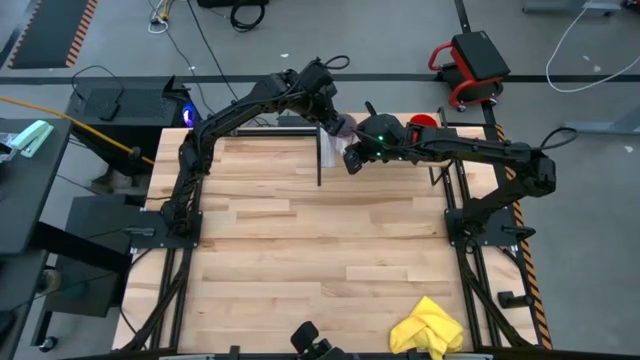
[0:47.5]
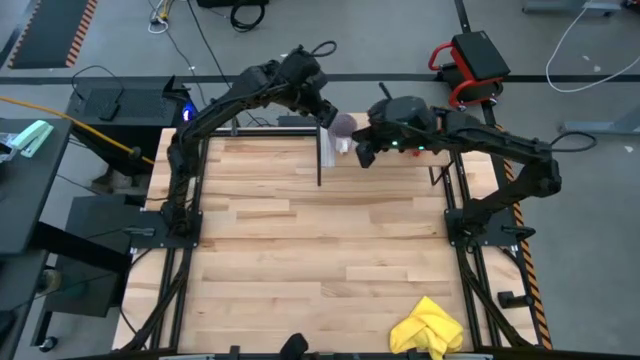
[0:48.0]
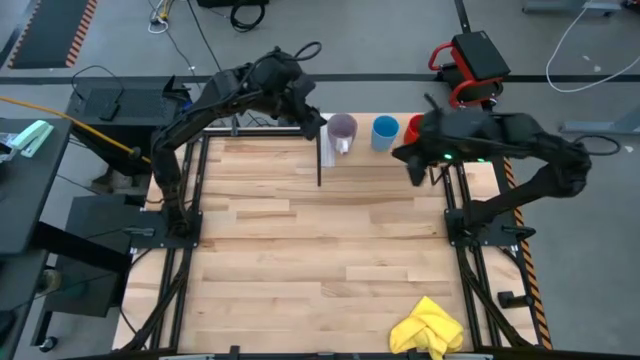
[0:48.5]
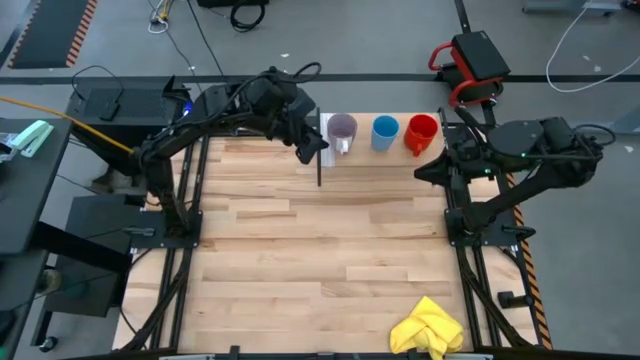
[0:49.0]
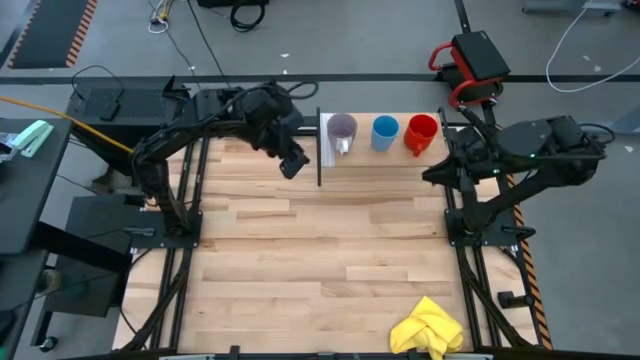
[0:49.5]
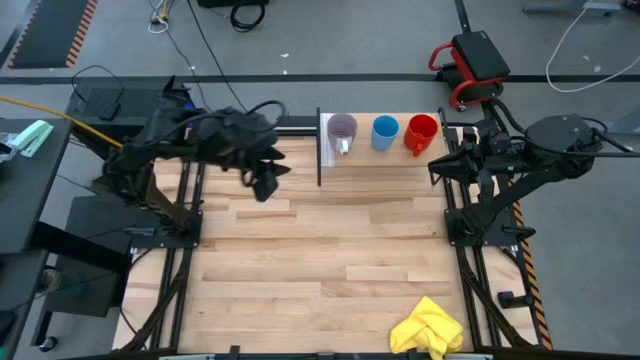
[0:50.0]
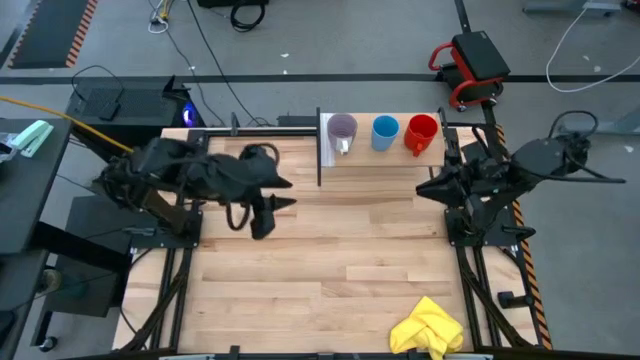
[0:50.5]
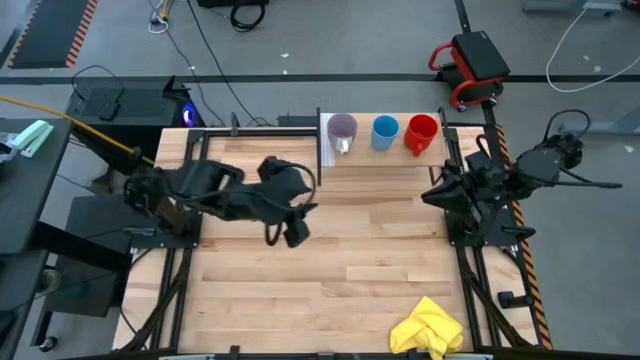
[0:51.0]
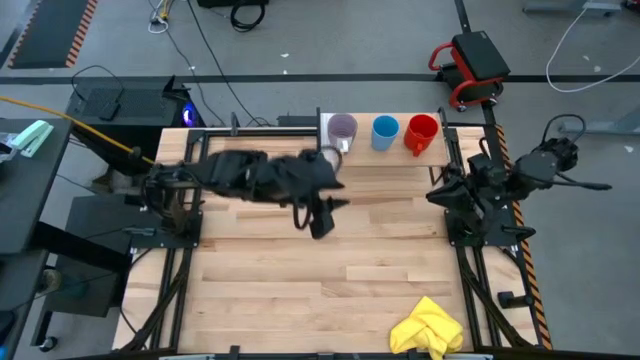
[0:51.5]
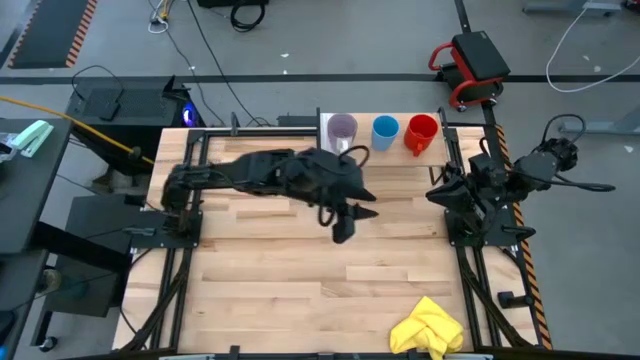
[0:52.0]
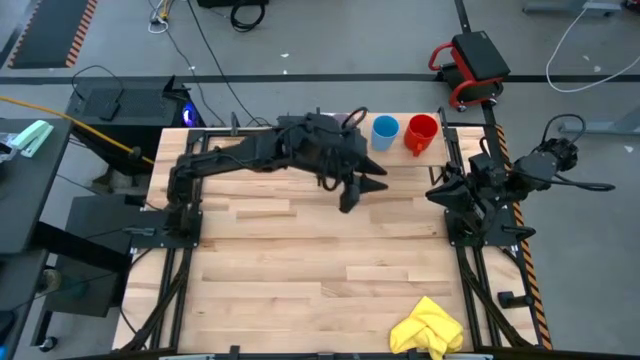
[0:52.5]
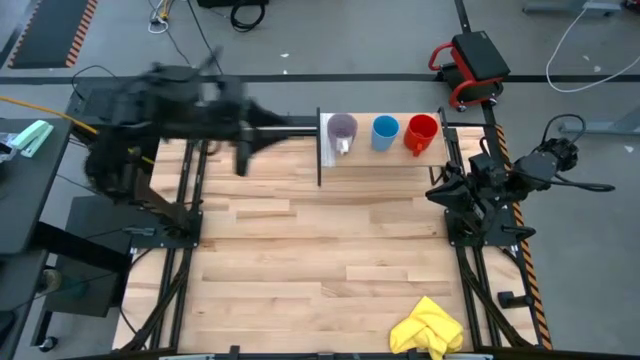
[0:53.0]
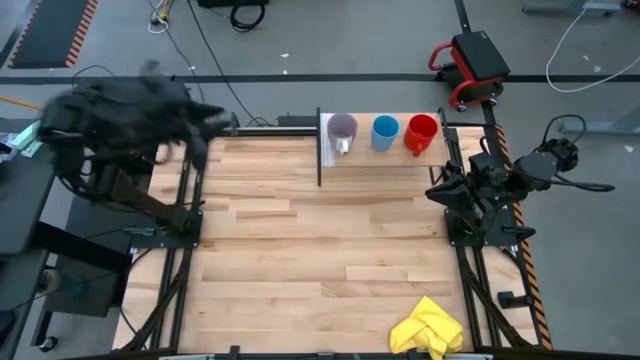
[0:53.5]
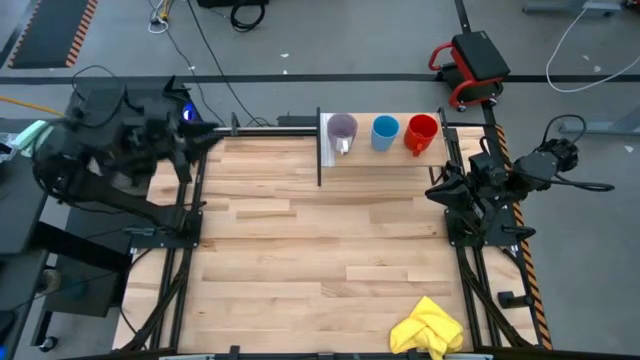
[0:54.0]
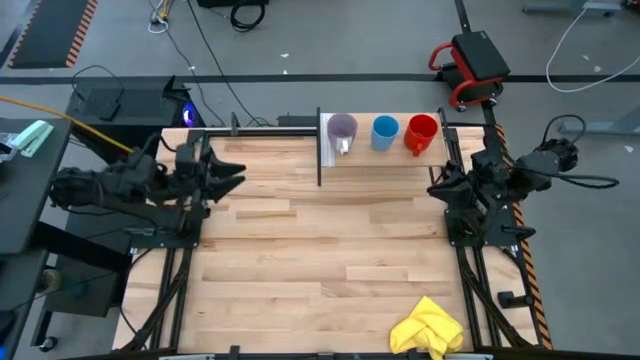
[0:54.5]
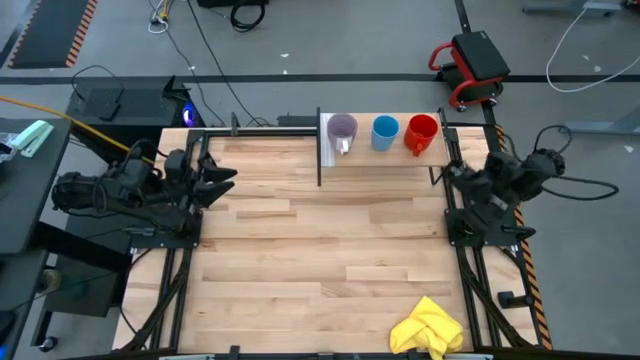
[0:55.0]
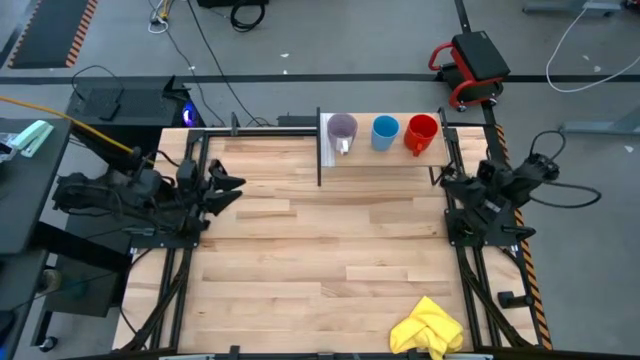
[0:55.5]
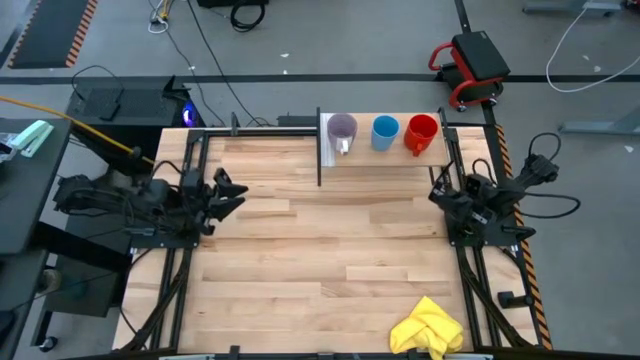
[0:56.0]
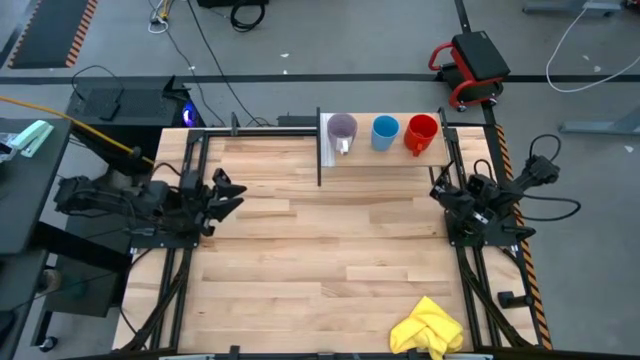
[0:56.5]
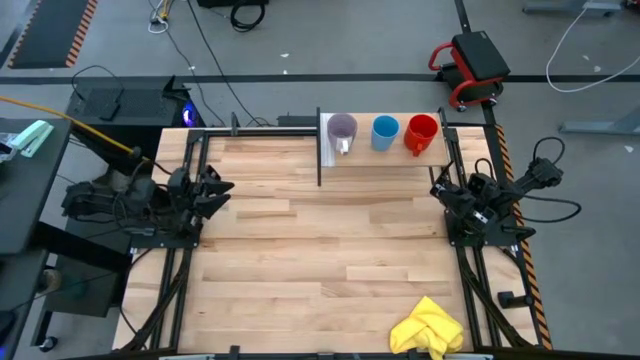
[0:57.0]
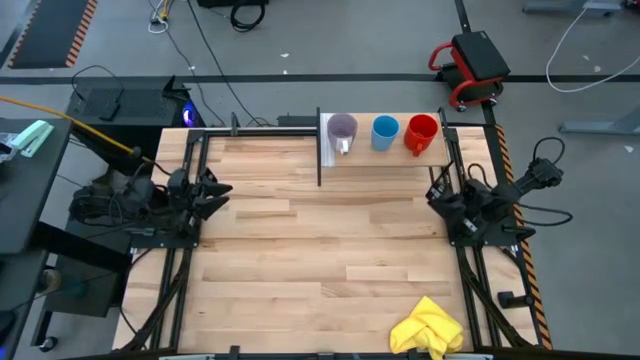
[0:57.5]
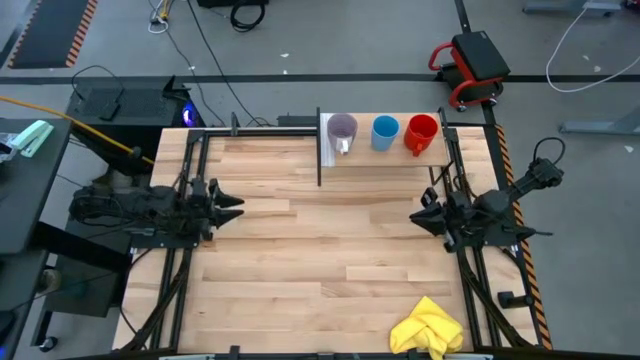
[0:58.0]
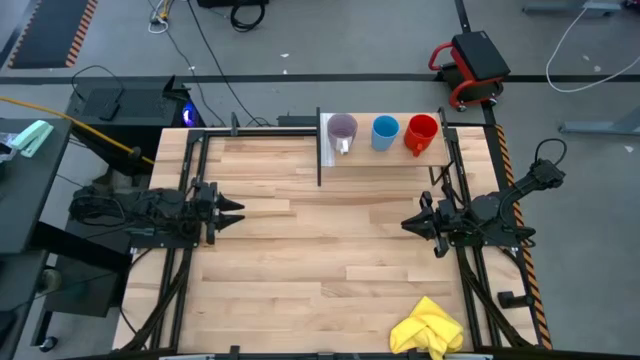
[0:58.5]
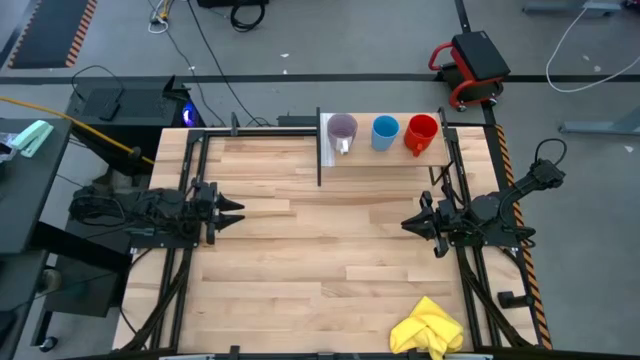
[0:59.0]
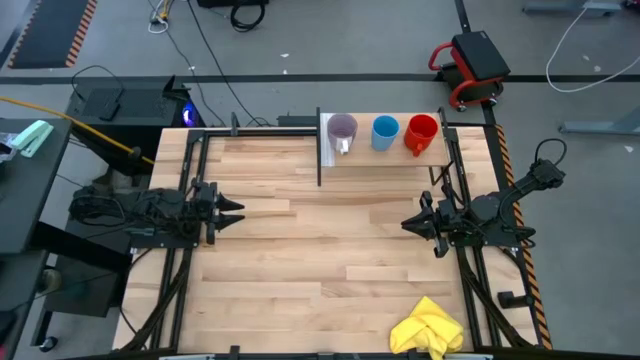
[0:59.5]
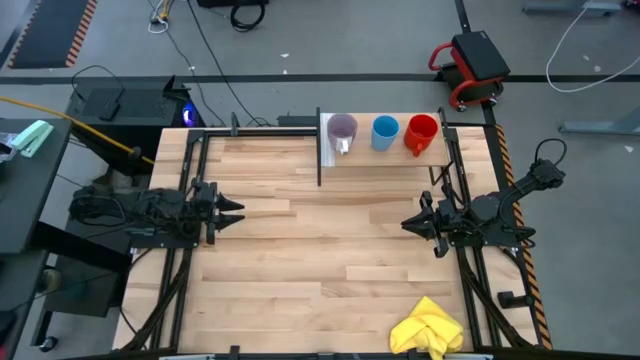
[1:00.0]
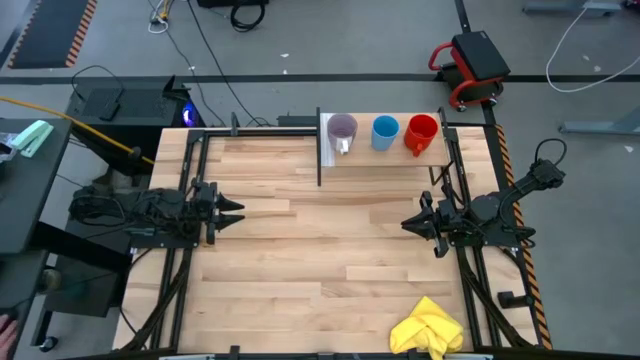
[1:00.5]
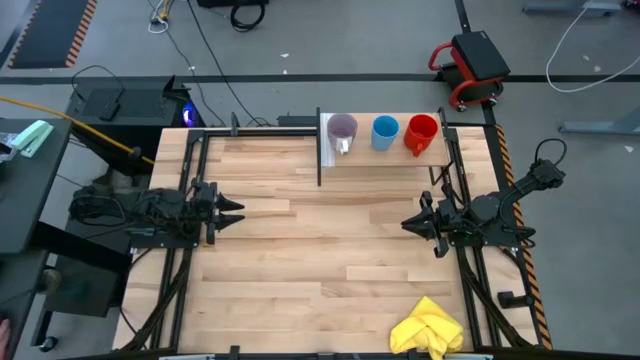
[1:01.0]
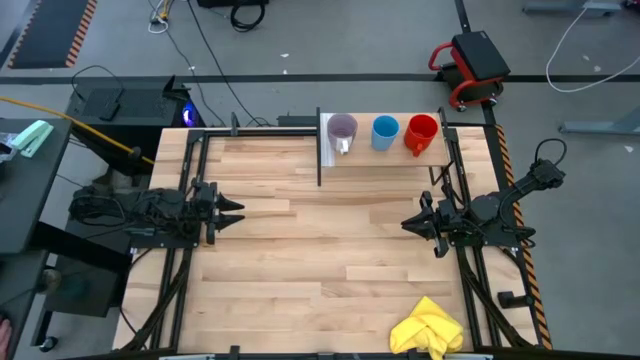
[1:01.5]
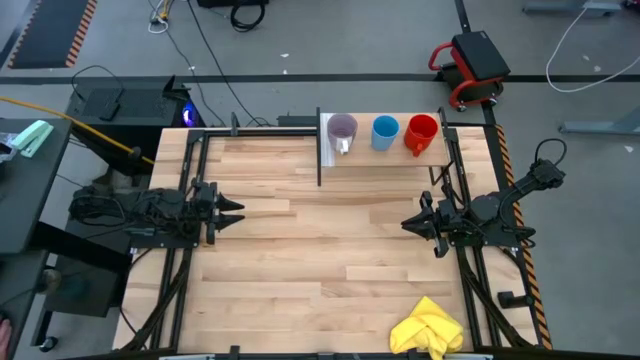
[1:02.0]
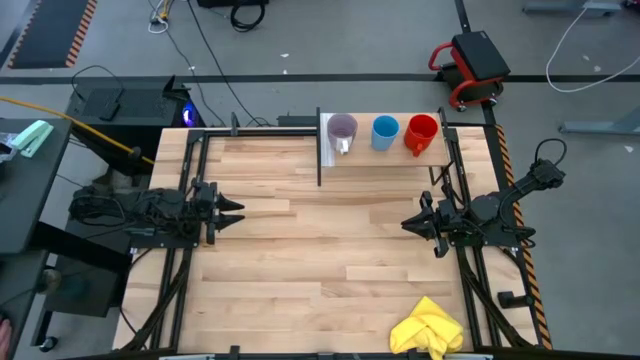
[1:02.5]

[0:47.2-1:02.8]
Task: Stack small to large cups/mugs on shelf
Return to Home Position

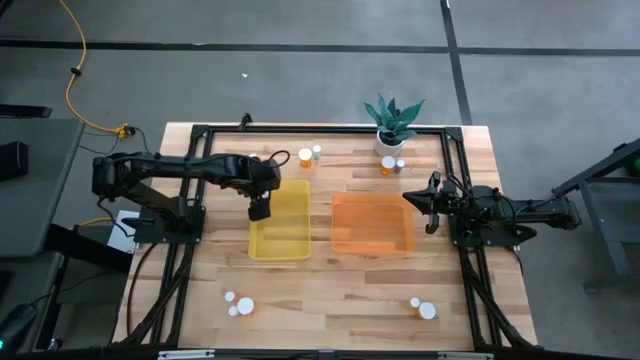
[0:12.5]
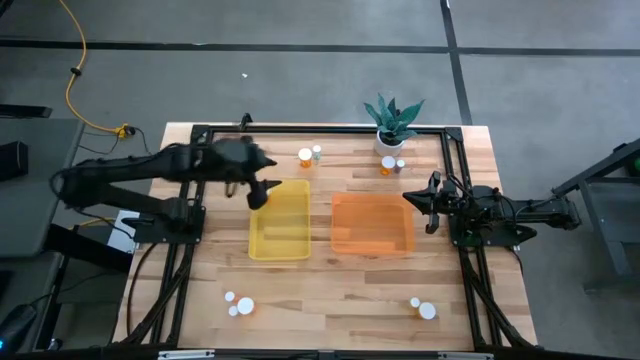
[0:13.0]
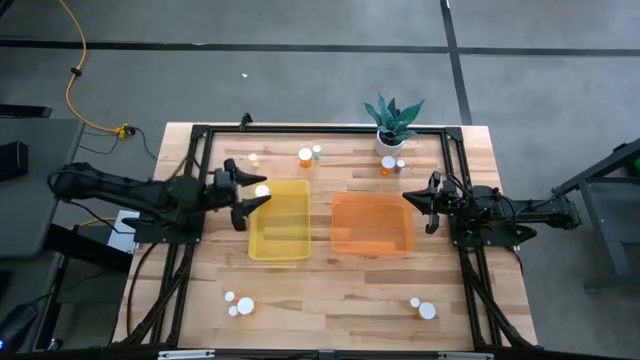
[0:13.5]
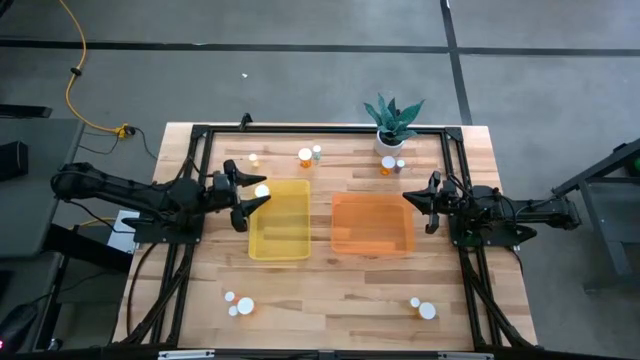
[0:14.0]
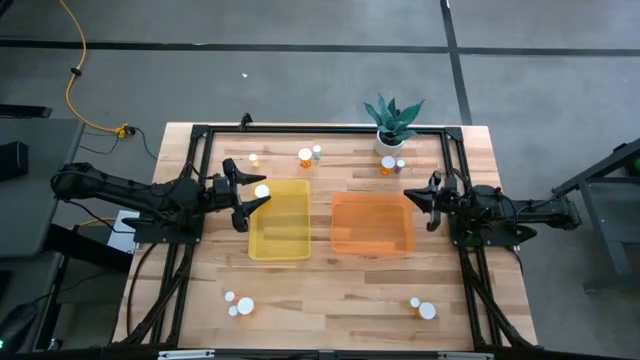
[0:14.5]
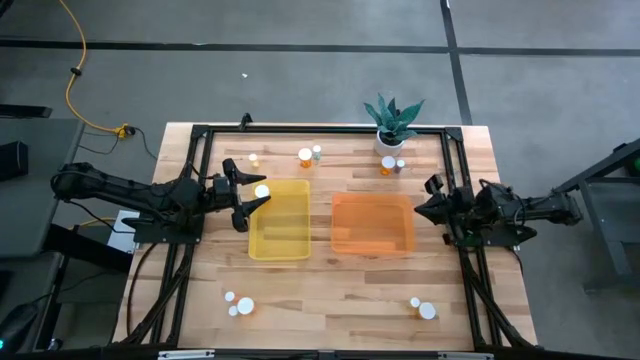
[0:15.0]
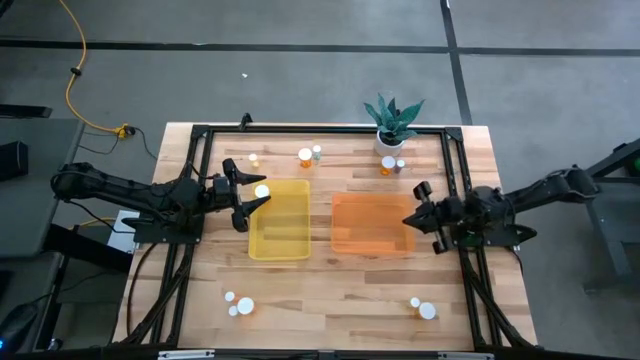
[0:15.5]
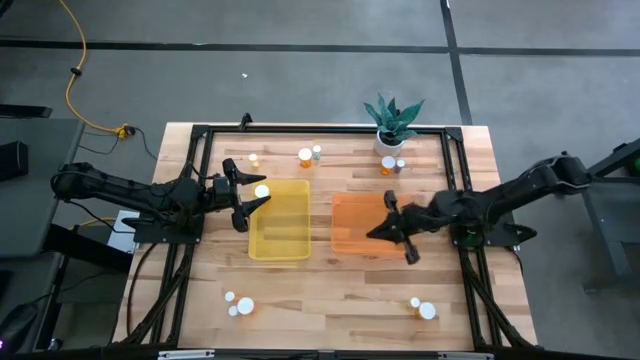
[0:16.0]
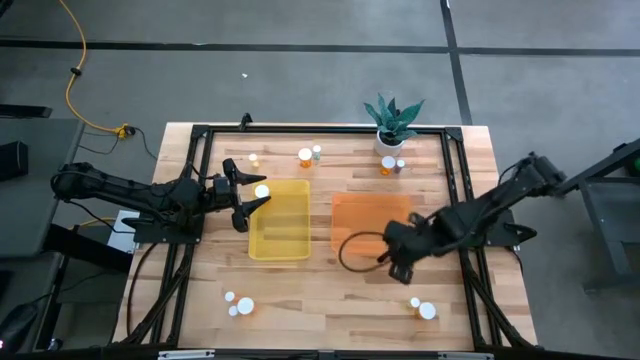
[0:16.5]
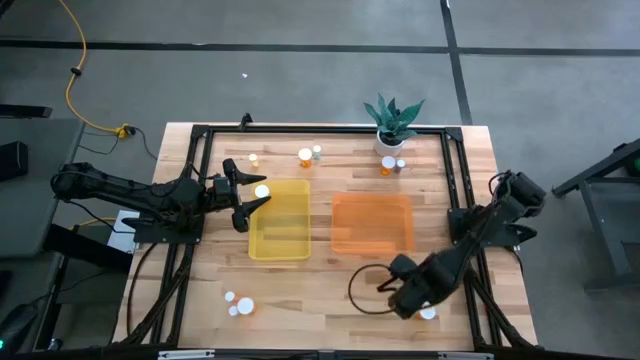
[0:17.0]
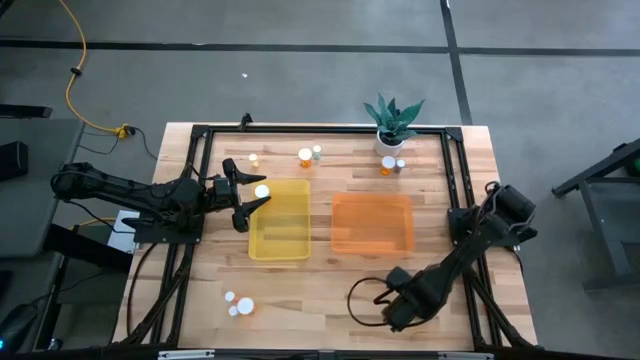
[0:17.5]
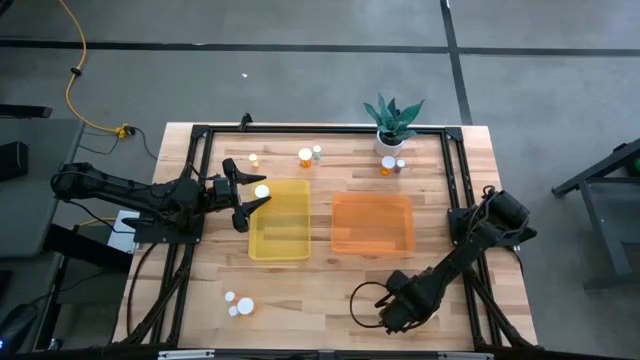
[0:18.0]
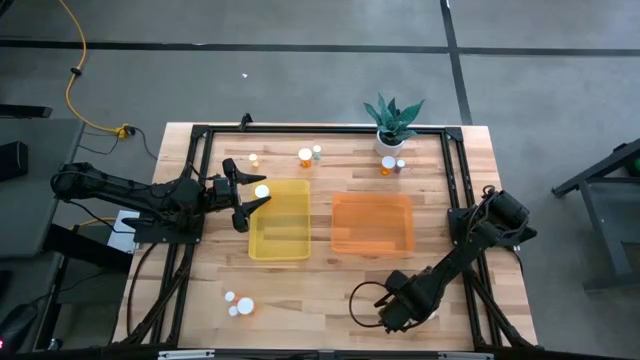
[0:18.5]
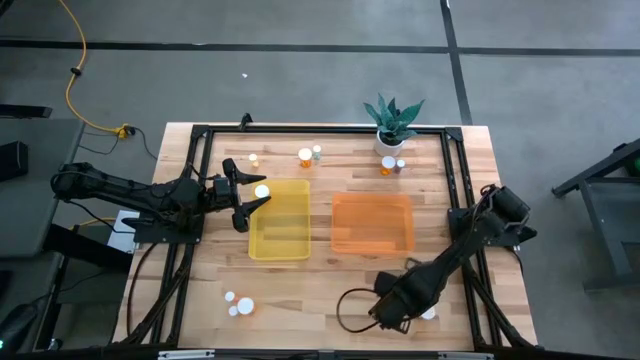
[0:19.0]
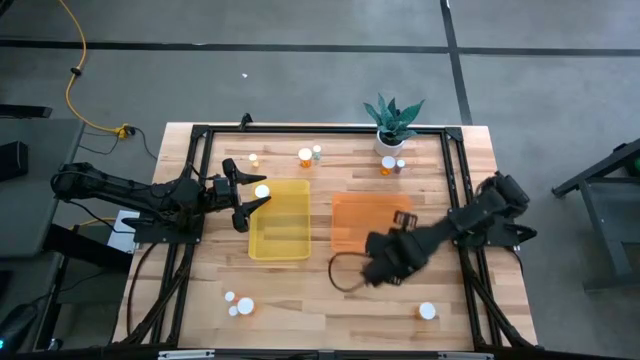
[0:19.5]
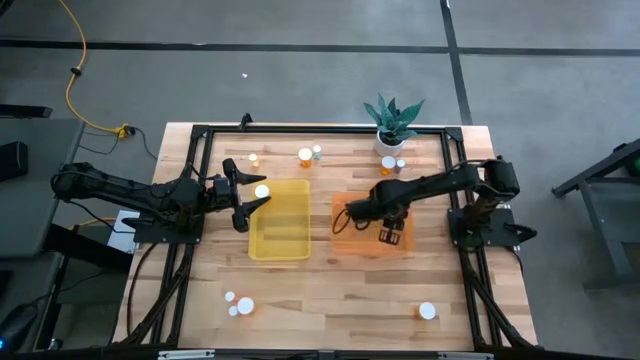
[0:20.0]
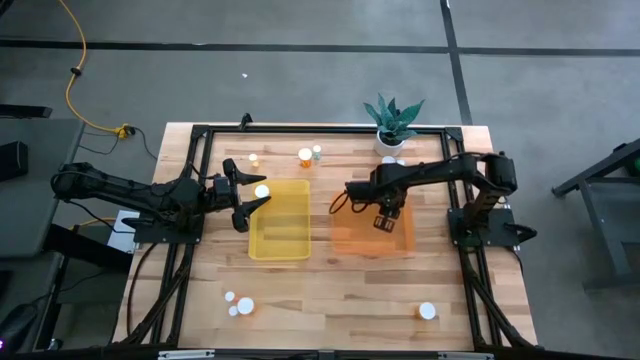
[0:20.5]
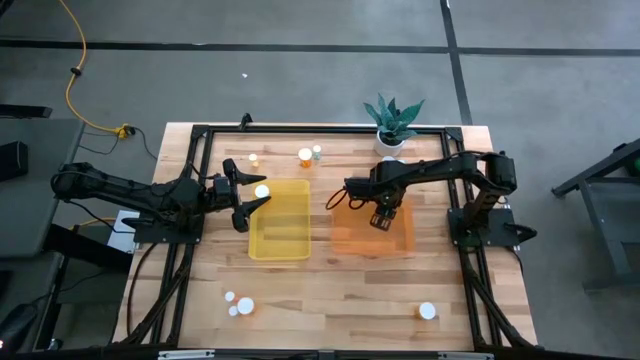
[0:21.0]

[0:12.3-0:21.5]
Task: Pick and place medicine bottles into bin by pill shape (circle, oval)
Put the bottom small yellow tablet bottle into the orange bin
